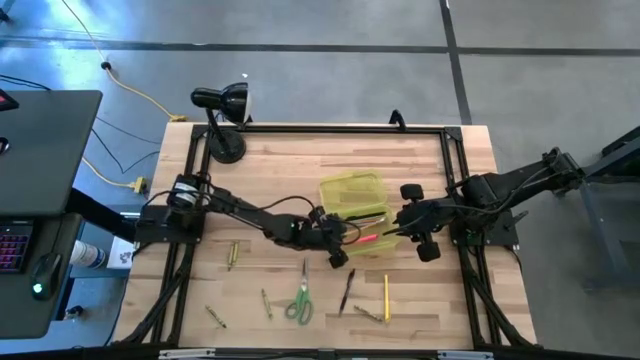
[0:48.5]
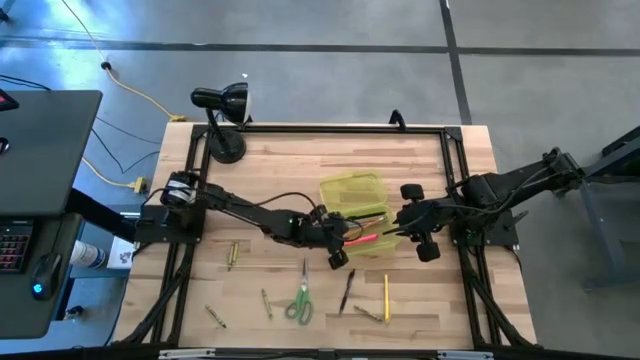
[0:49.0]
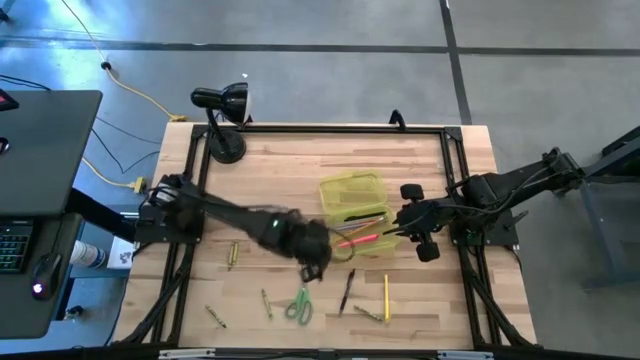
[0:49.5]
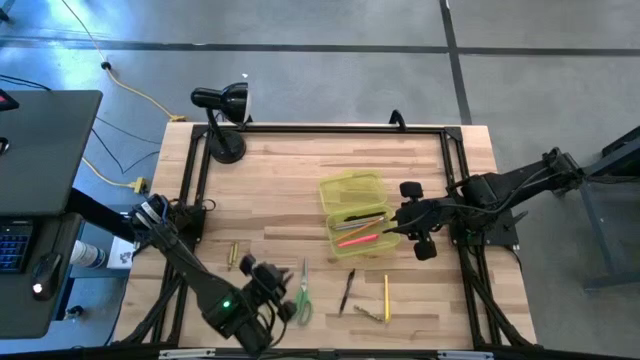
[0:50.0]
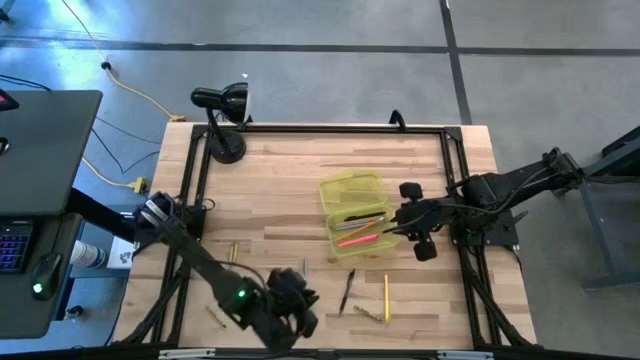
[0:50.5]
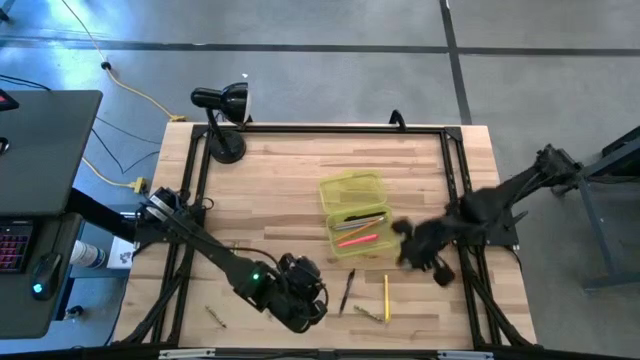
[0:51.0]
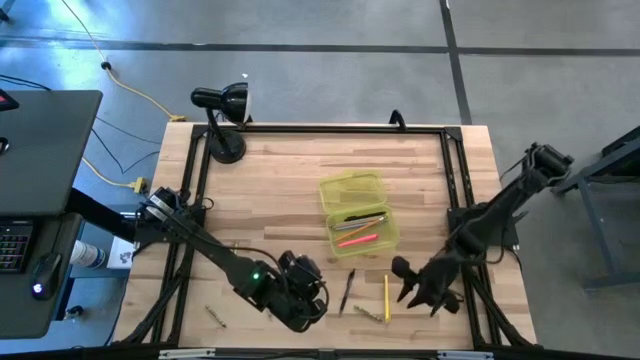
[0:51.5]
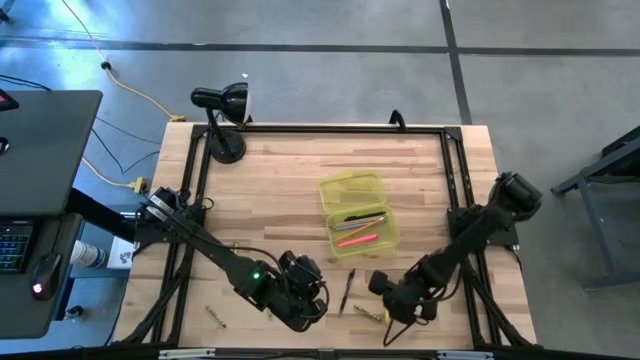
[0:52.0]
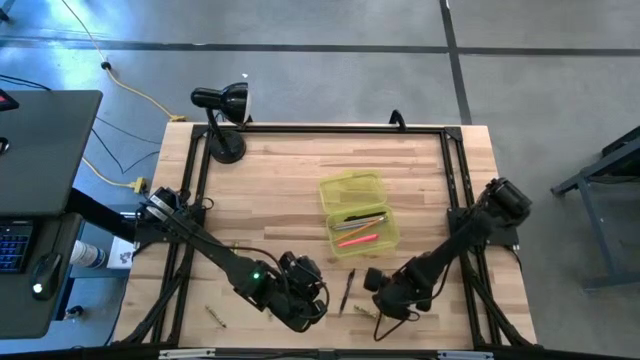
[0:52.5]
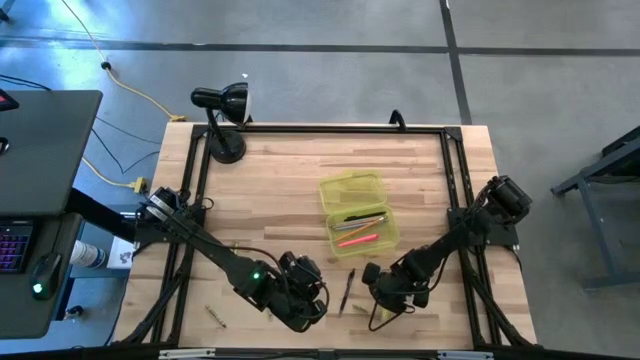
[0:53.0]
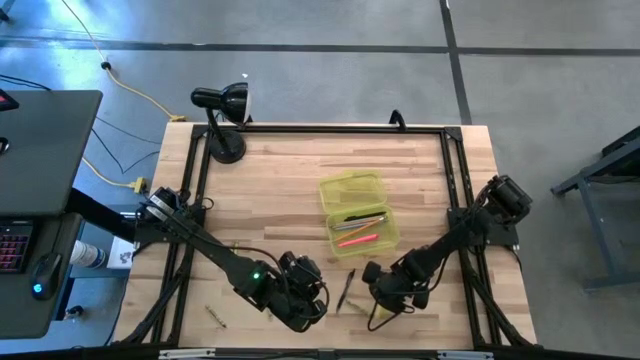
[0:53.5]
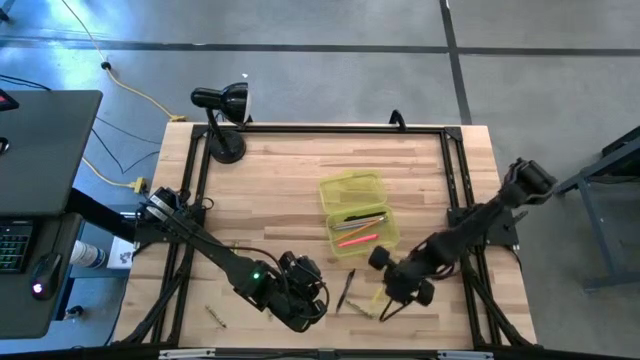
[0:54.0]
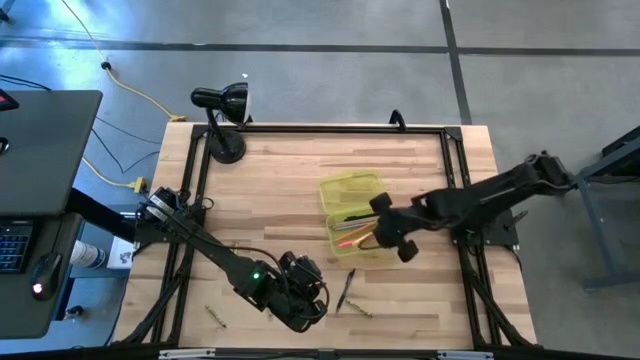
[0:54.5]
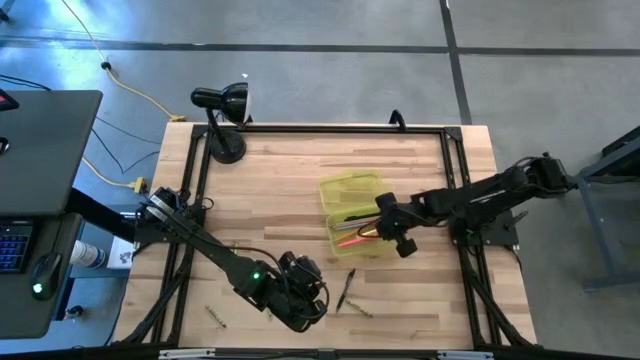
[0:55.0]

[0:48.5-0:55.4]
Task: Pick & place school supplies into a supply box
Put the yellow pen into the yellow supply box

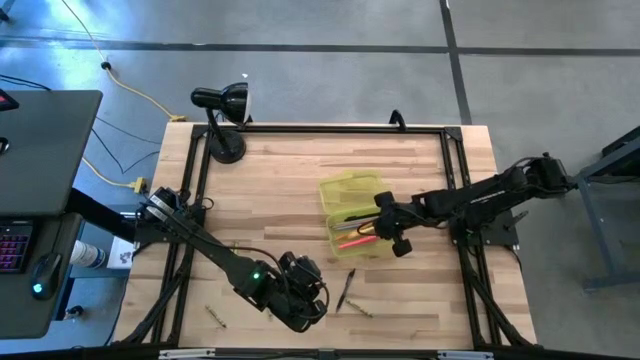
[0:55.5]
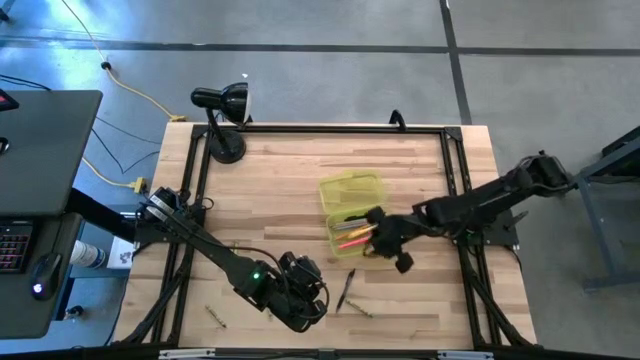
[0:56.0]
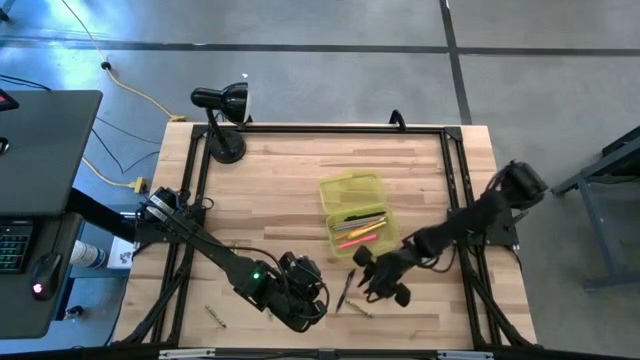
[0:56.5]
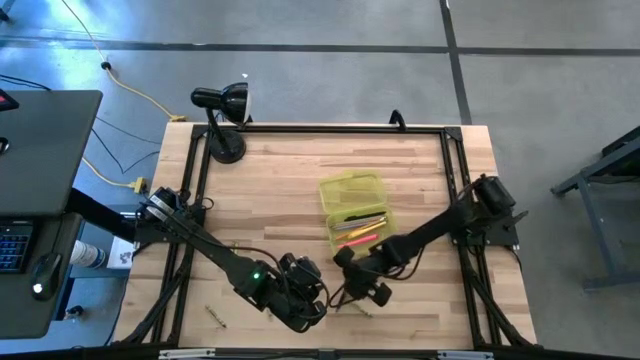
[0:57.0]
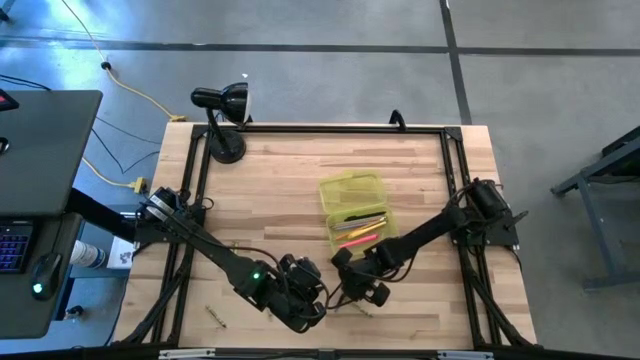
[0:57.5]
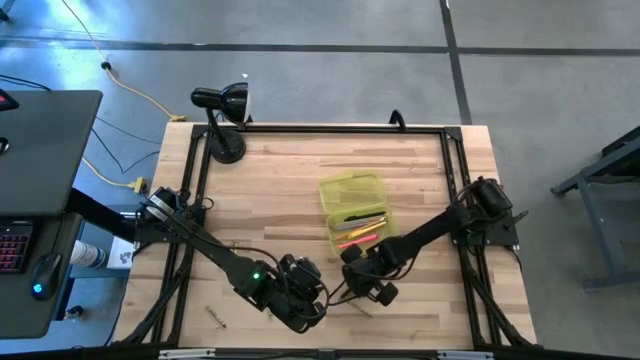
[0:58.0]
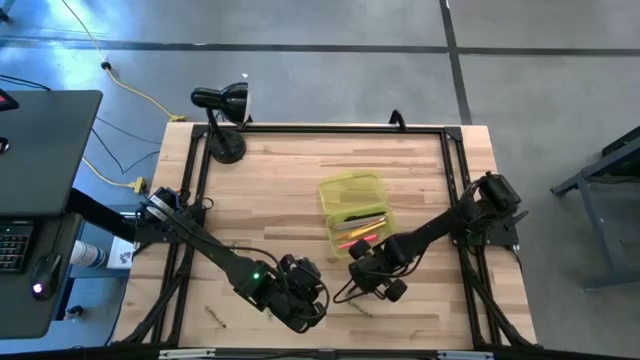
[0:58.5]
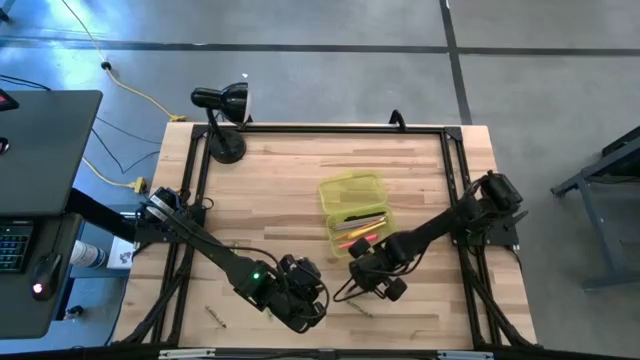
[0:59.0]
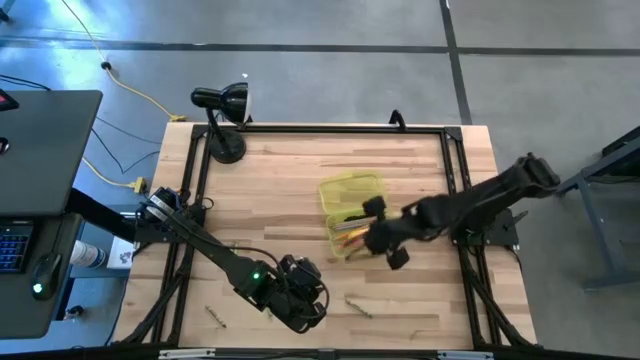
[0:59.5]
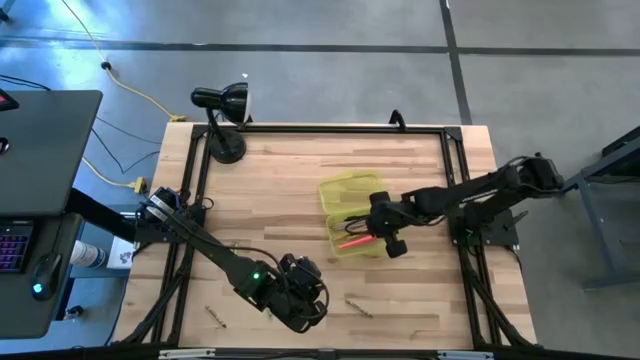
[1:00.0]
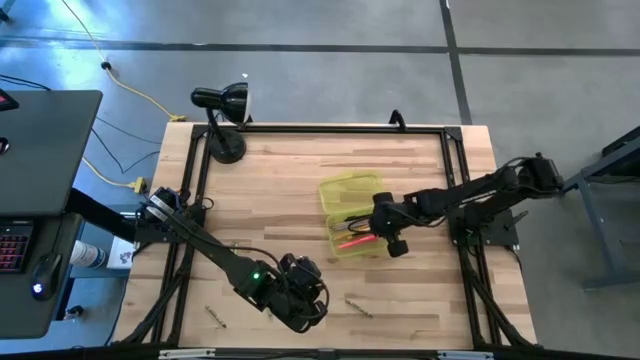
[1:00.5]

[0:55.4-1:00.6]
Put the black pen into the yellow supply box

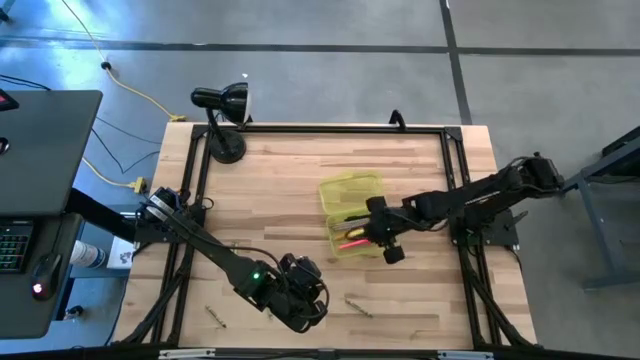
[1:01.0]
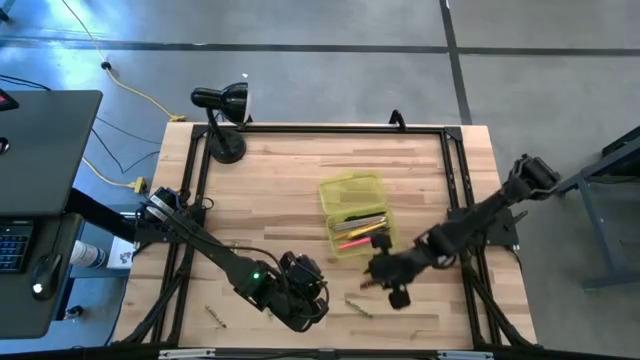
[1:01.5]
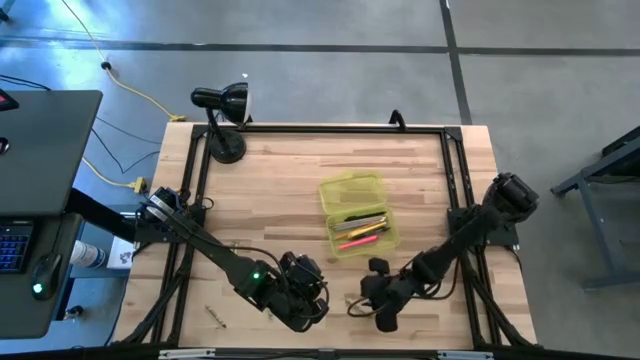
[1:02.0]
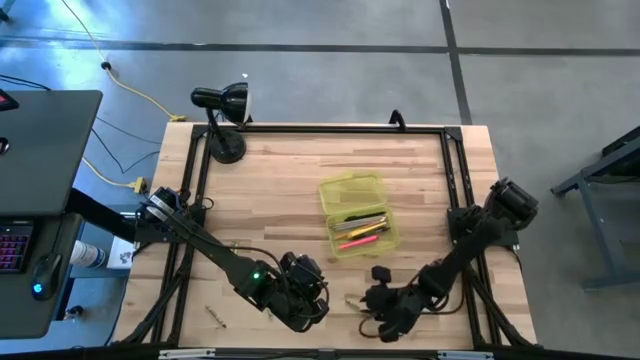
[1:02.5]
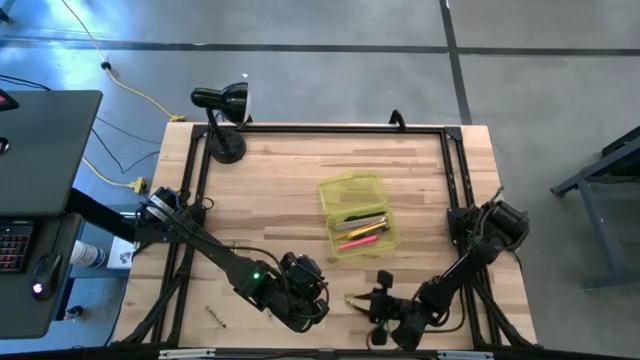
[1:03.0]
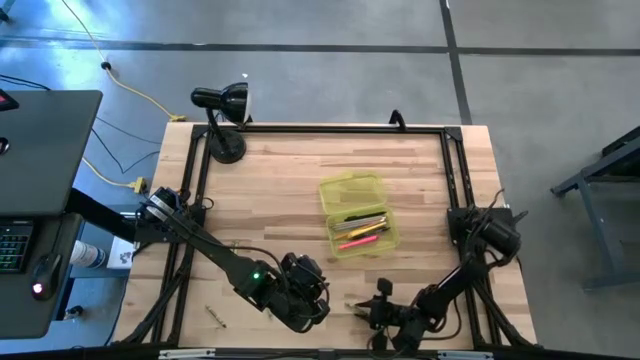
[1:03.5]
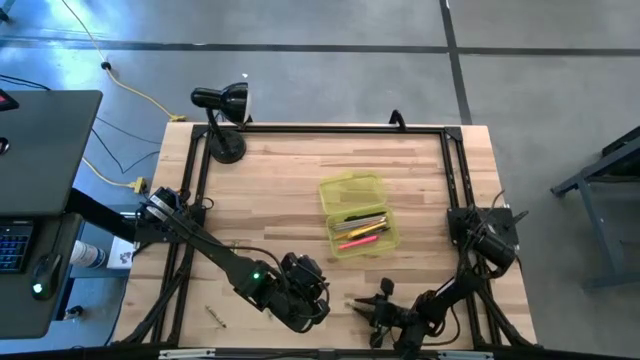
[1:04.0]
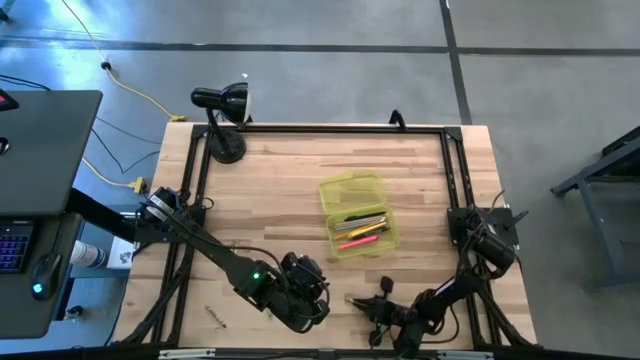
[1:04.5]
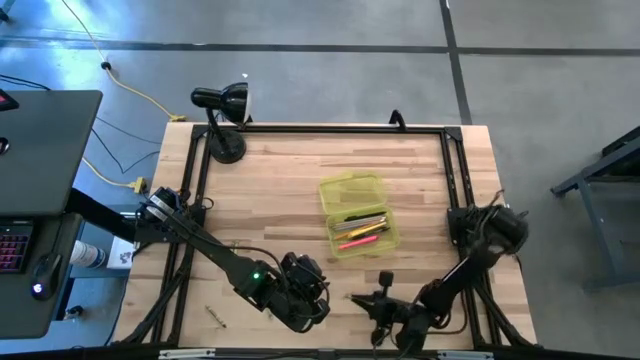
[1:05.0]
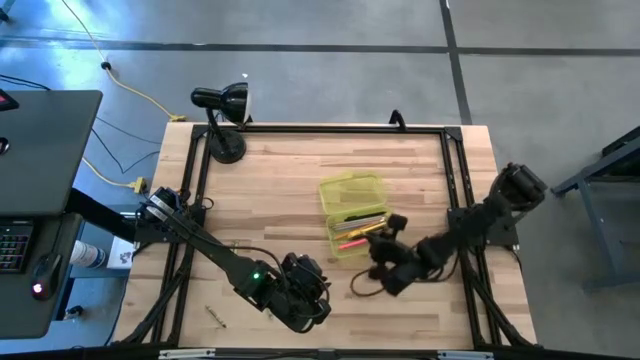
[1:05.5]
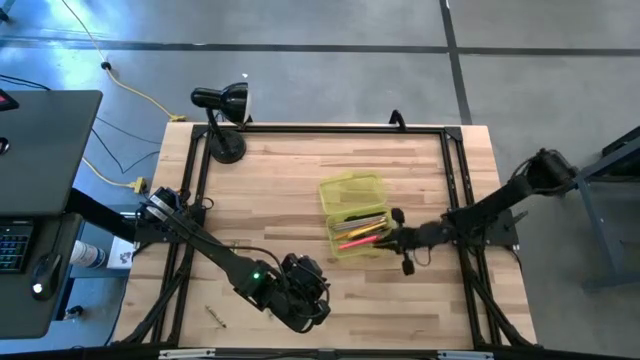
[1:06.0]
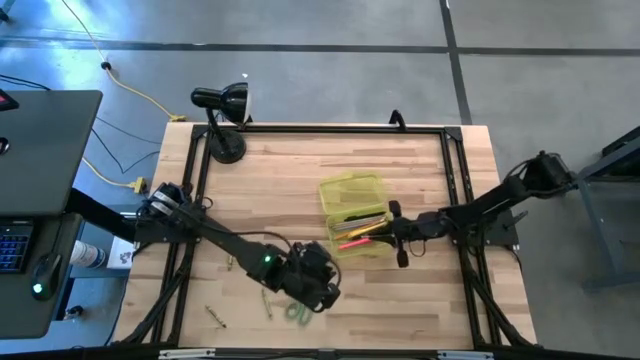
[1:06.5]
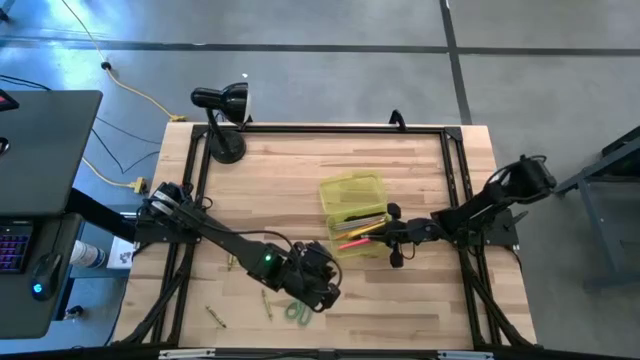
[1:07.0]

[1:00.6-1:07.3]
Put the green crayon into the yellow supply box

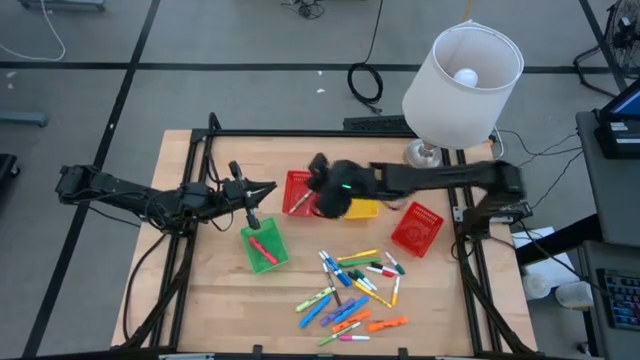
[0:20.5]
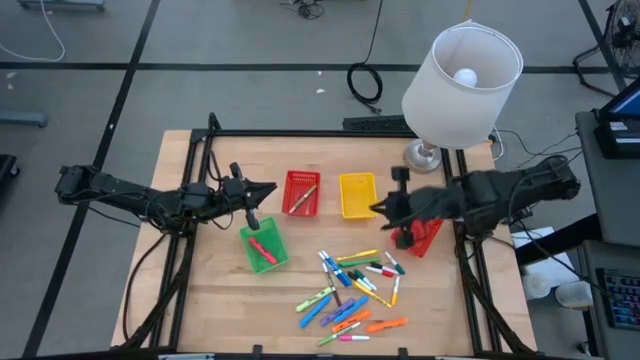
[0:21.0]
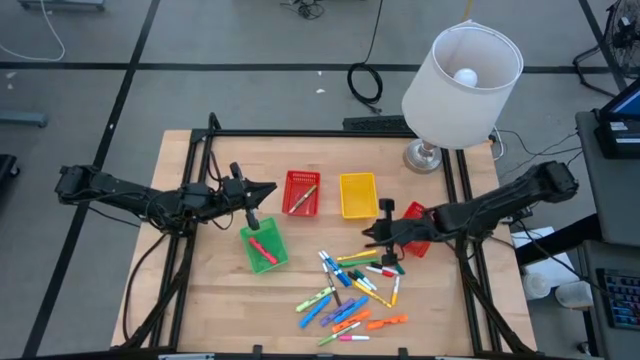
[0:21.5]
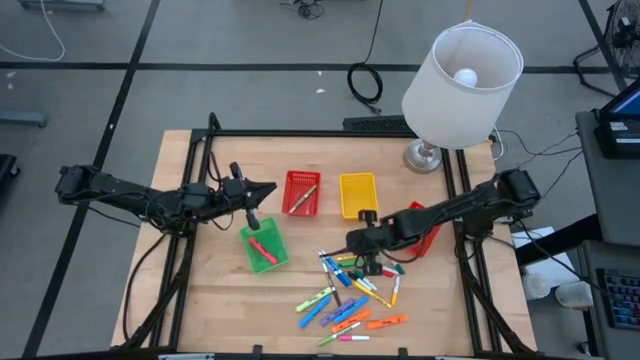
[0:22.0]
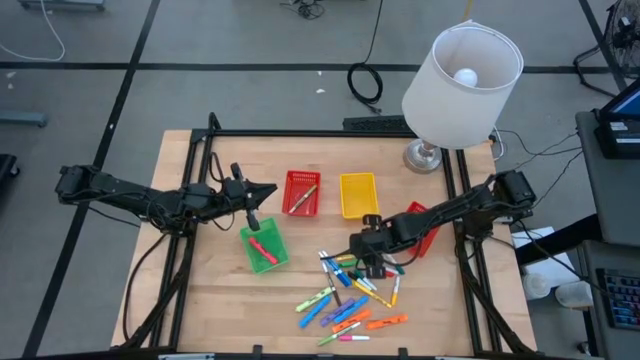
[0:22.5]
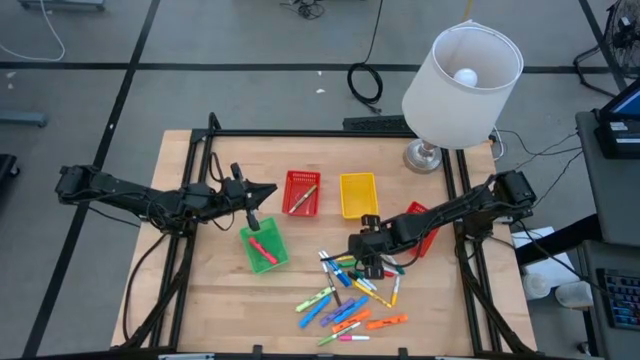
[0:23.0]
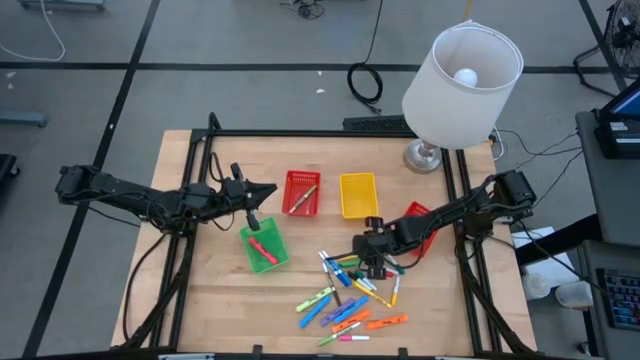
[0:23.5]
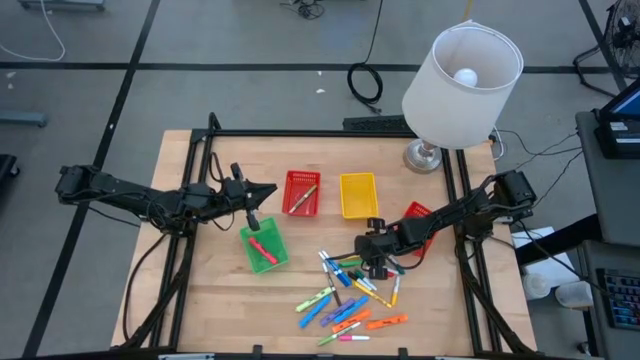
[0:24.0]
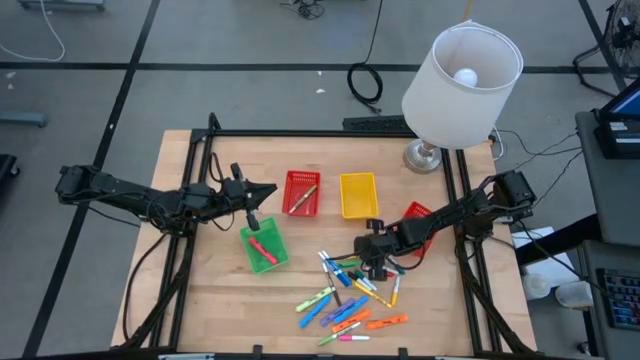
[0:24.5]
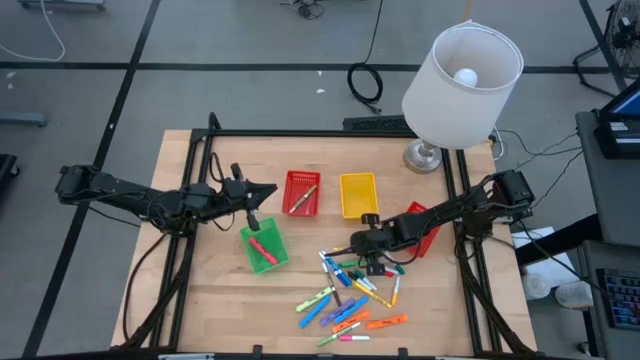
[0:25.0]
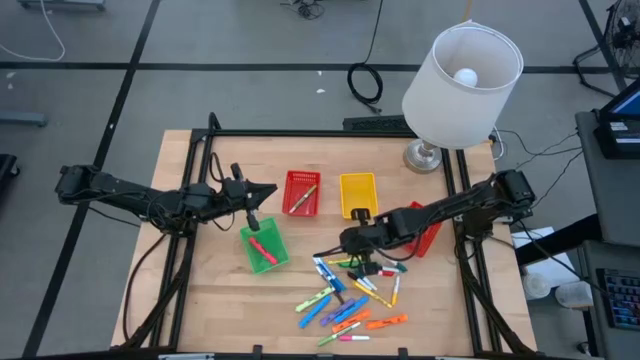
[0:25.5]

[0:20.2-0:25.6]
Task: Pick & Place Markers
Put the top yellow pen into the yellow bin
